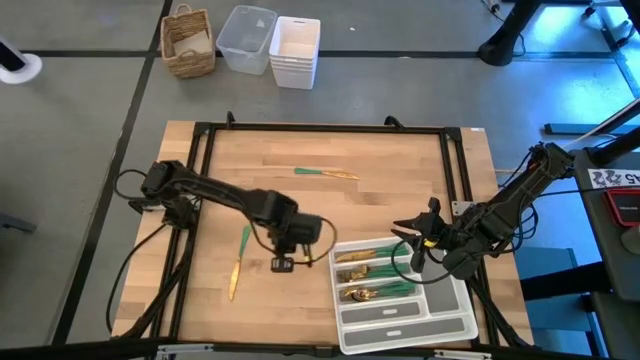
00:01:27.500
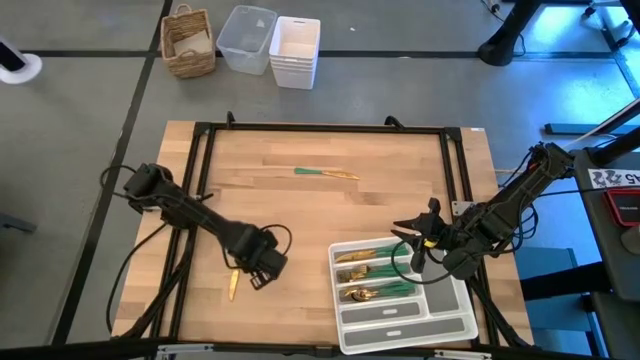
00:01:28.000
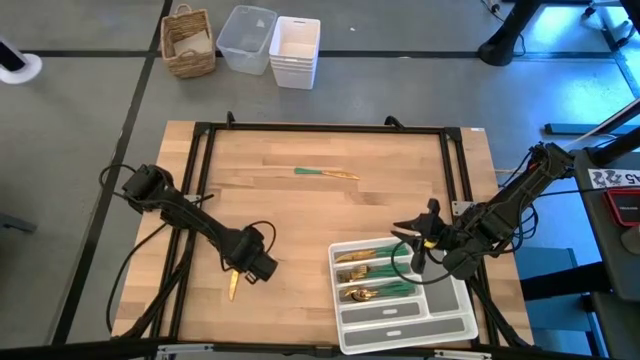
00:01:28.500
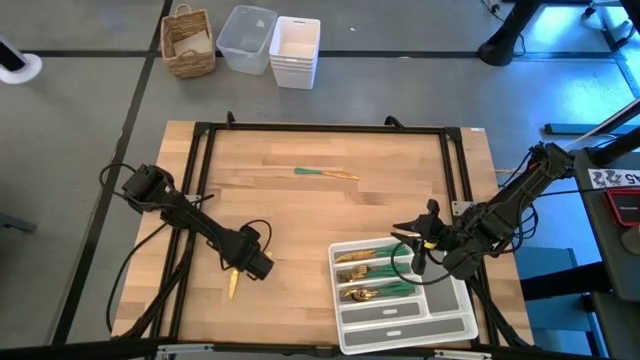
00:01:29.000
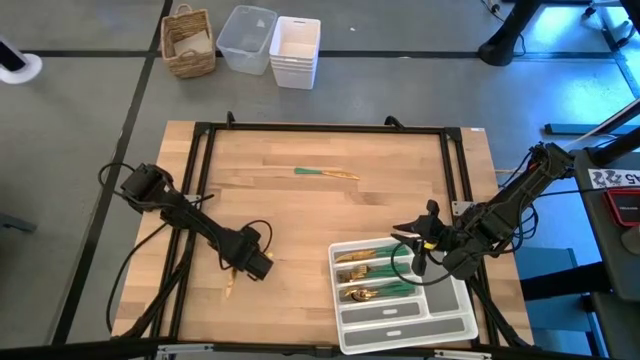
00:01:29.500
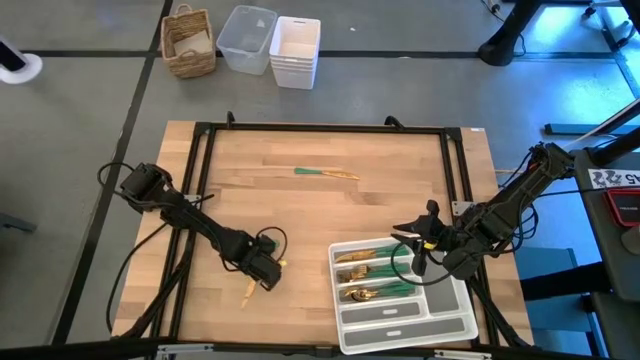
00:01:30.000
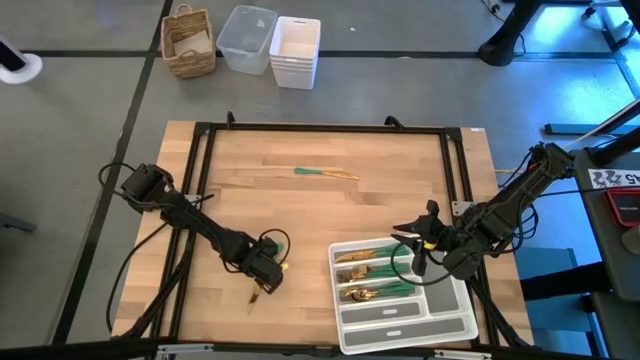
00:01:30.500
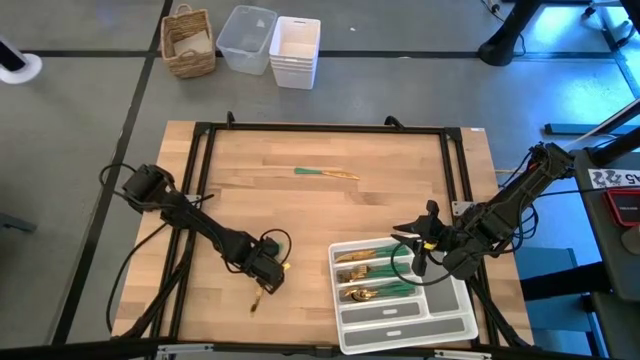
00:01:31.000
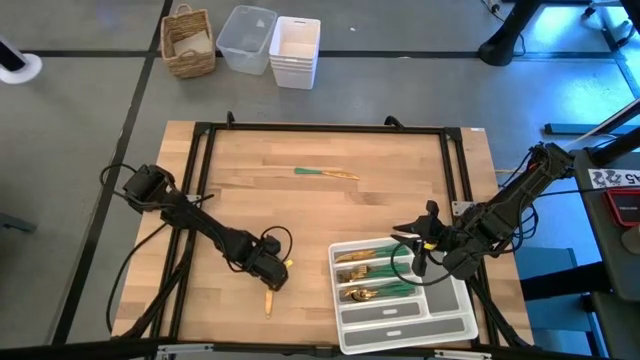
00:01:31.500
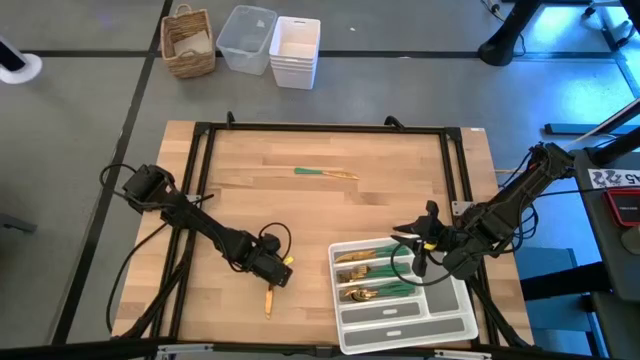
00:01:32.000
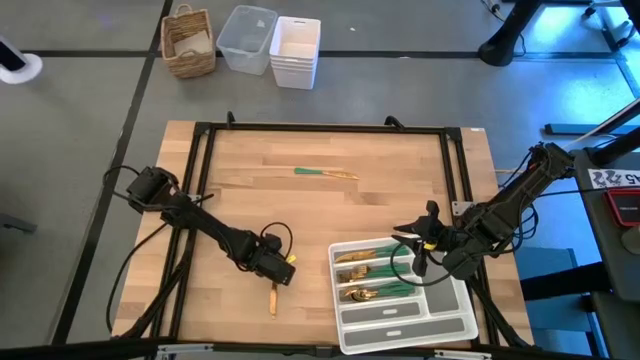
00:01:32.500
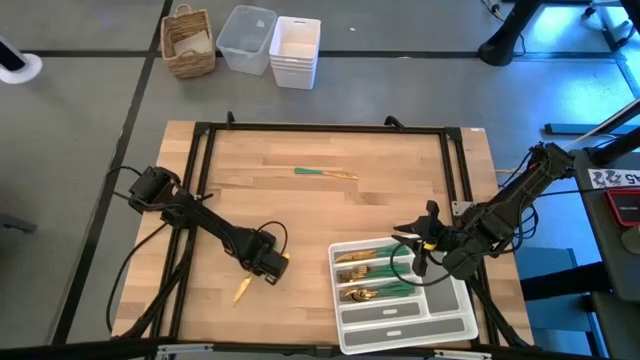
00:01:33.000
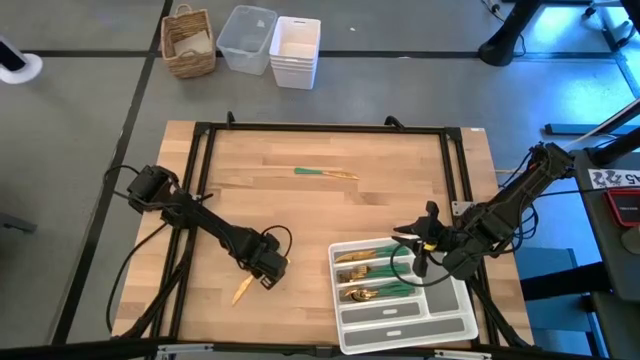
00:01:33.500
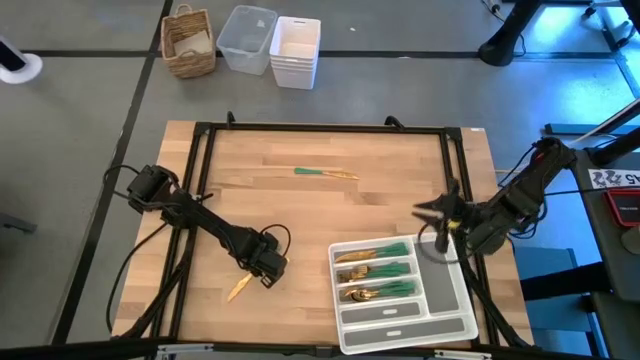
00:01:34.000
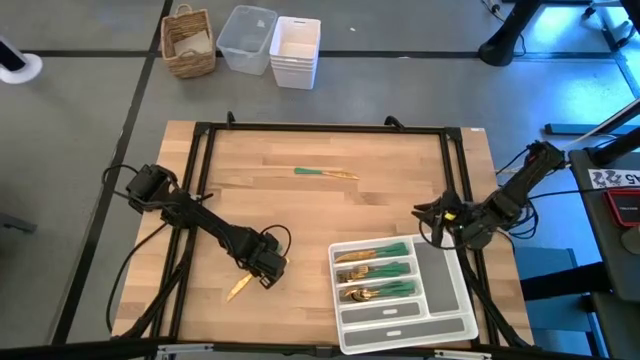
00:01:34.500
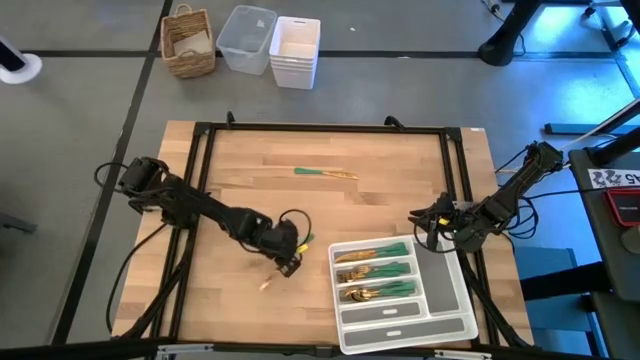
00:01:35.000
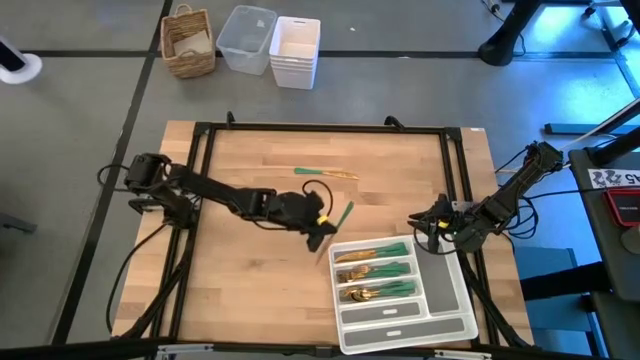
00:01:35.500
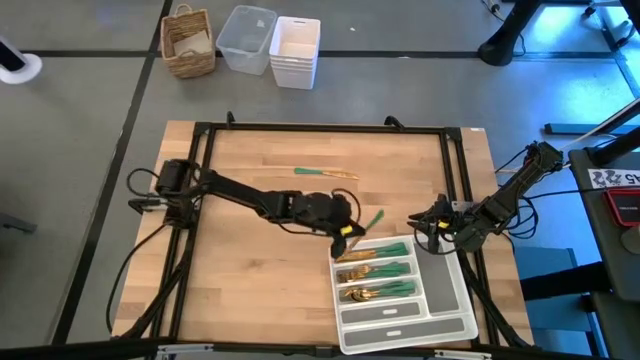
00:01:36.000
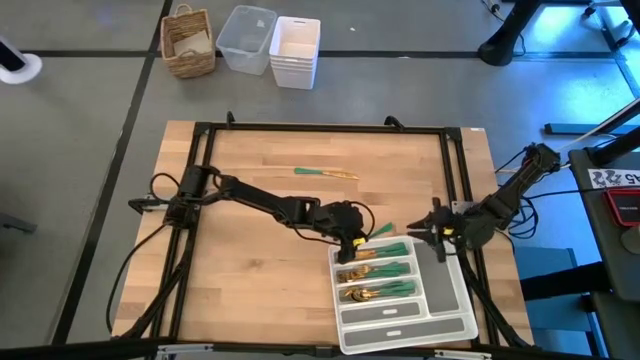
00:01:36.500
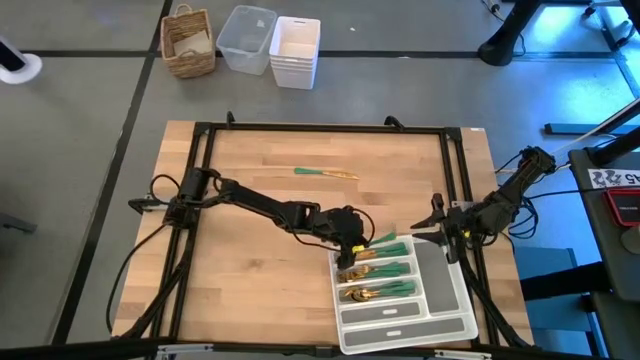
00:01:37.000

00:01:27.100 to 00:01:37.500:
Task: Sort silverware
Put the bottom green table knife into the silverware tray

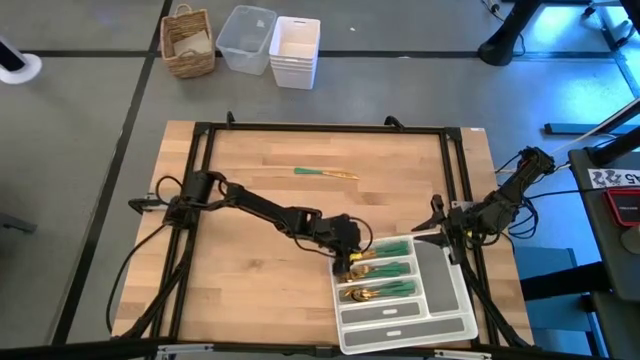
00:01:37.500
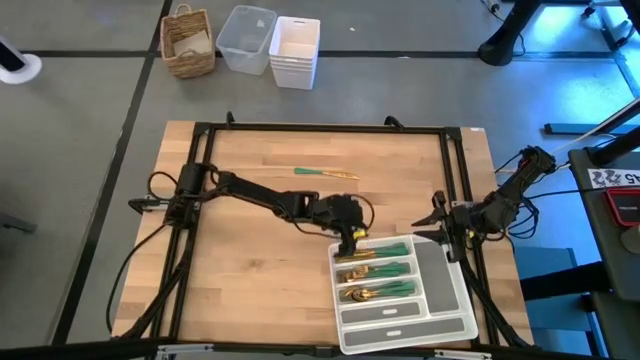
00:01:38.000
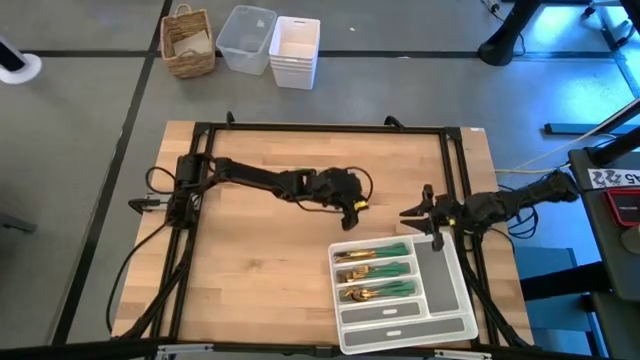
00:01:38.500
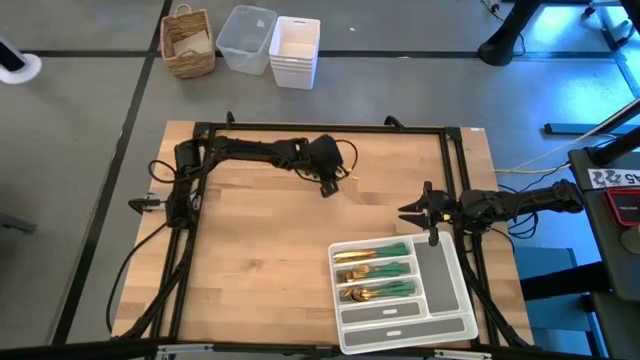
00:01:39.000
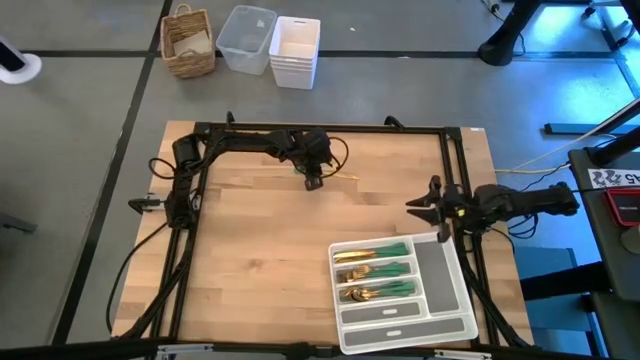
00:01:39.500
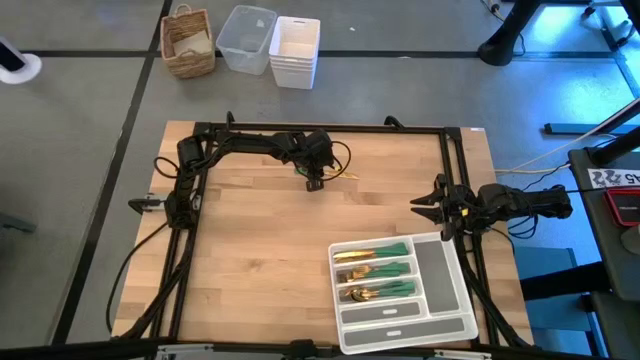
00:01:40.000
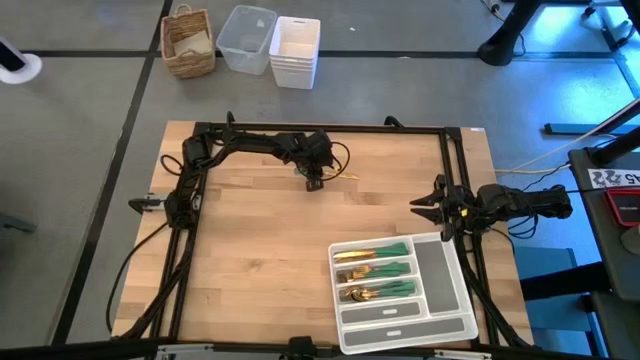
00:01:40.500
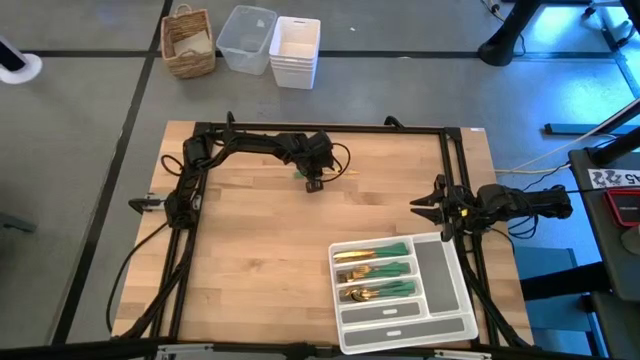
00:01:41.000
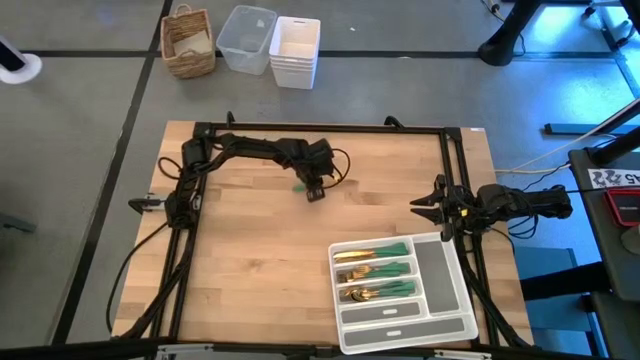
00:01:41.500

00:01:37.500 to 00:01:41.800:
Put the green table knife into the silverware tray

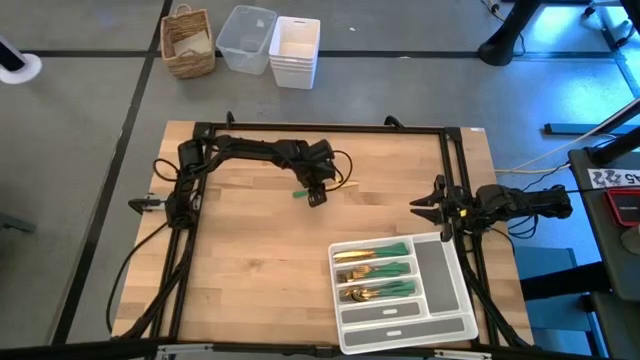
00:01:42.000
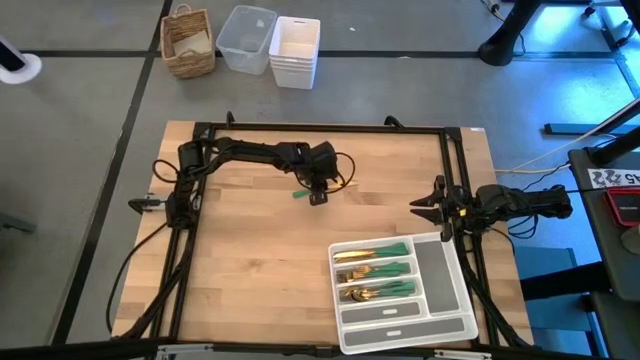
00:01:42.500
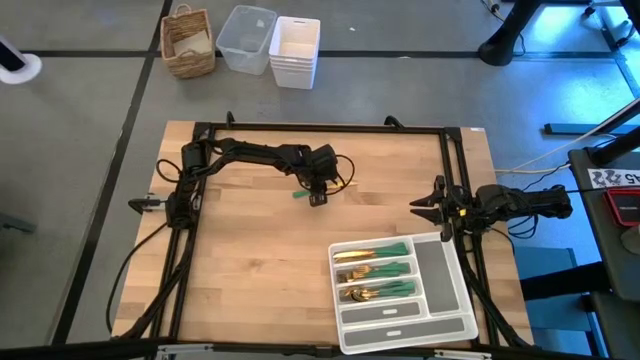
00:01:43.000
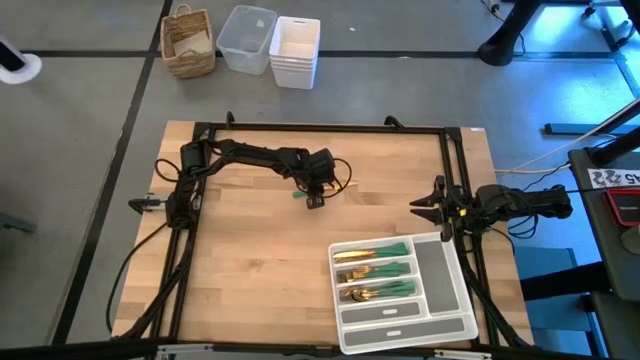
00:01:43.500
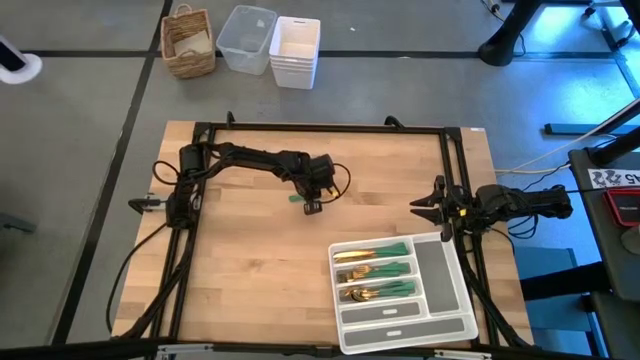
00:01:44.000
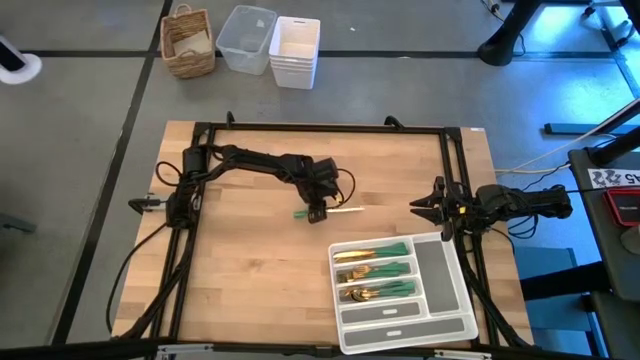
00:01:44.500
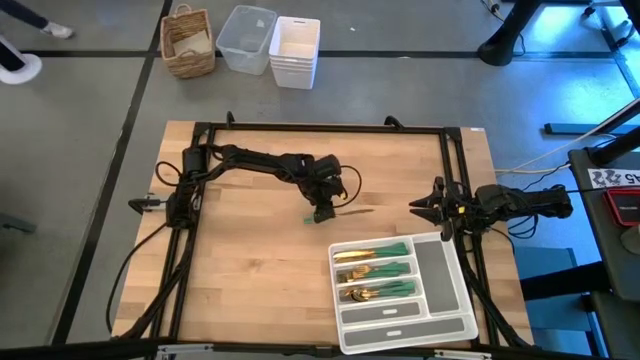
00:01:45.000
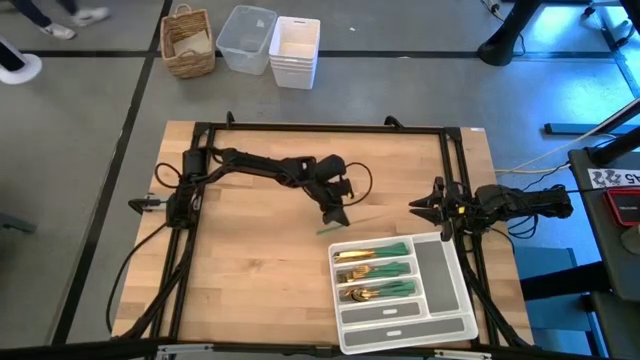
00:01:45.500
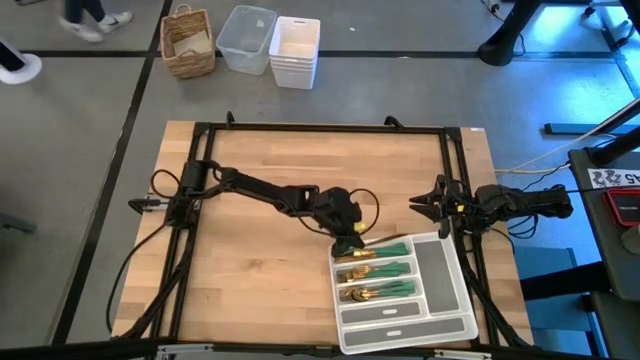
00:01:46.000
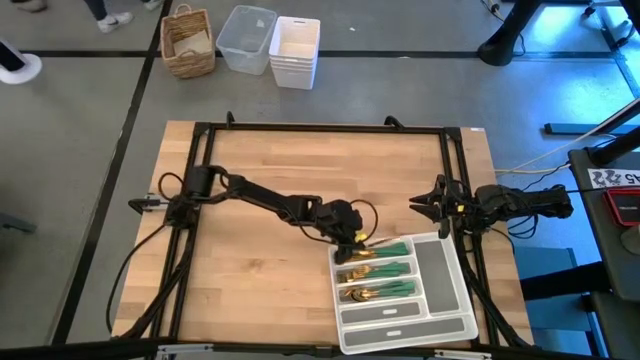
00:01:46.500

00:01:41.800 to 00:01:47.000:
Put the green table knife into the silverware tray

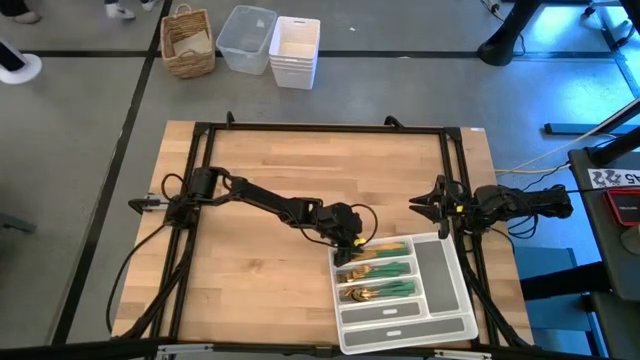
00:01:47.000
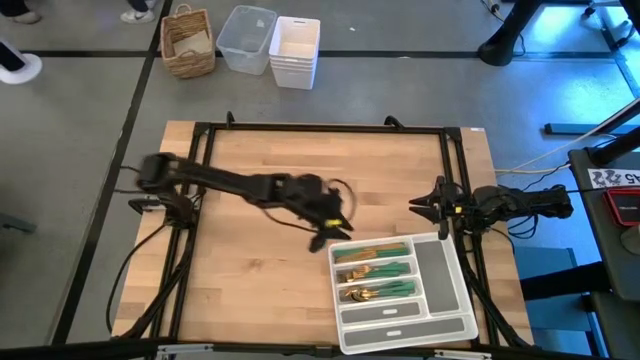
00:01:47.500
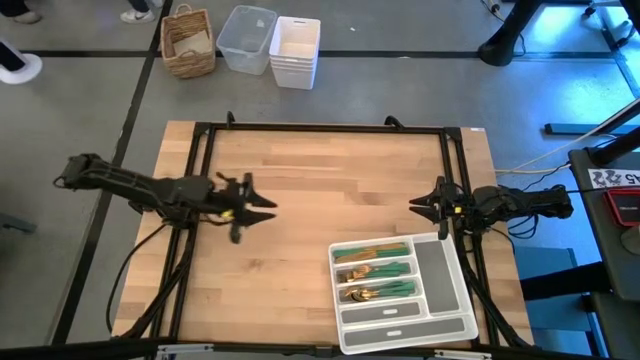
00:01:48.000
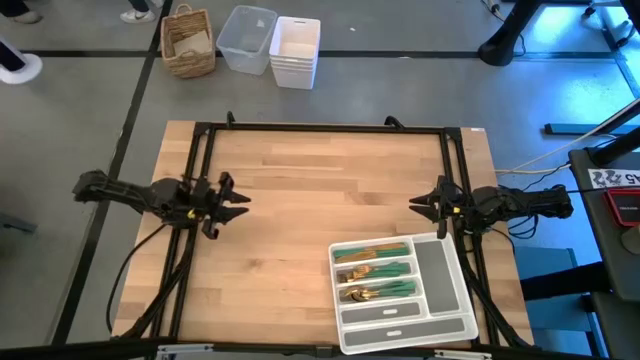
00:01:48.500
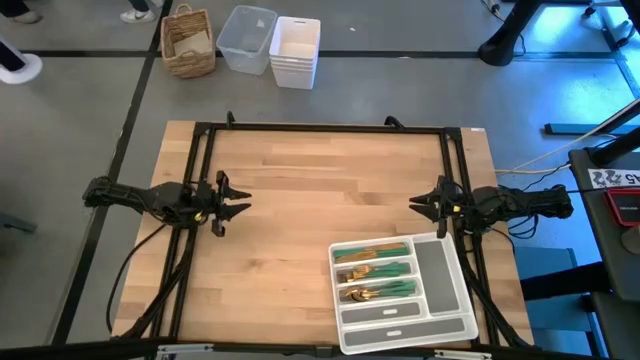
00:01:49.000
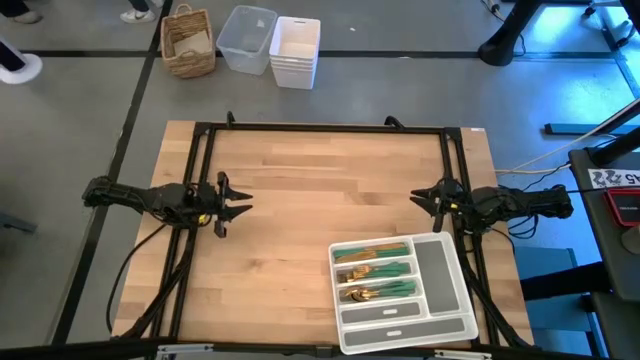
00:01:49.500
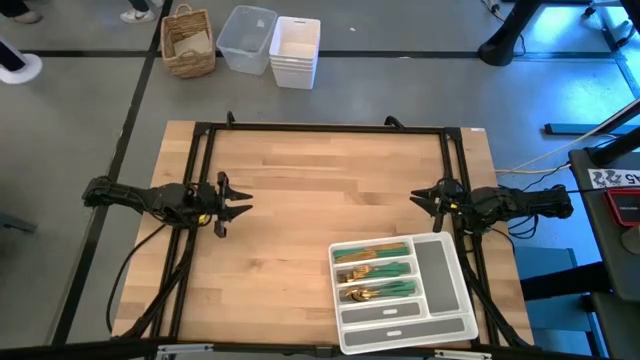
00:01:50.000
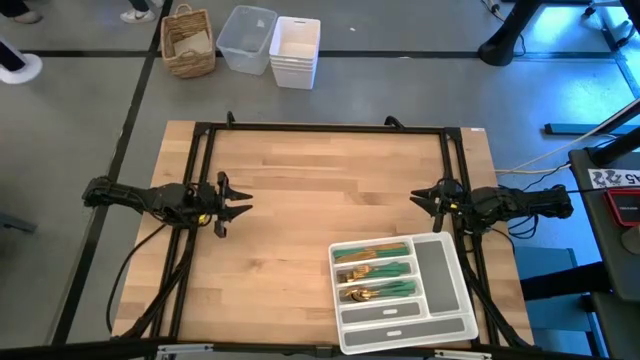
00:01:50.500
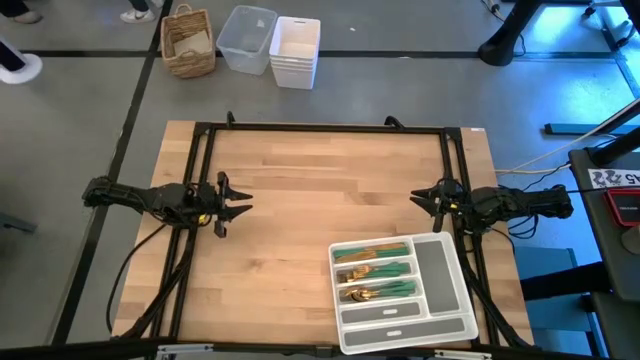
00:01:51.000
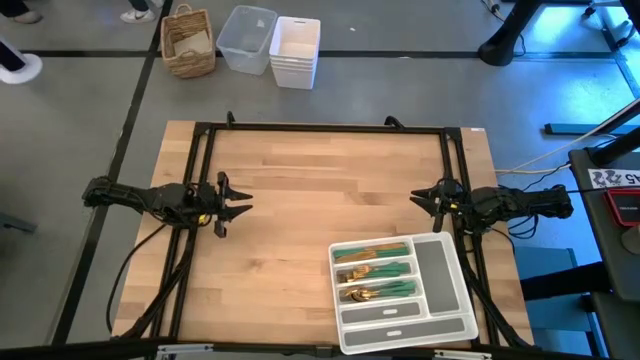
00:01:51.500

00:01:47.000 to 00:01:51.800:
Return to Home Position
